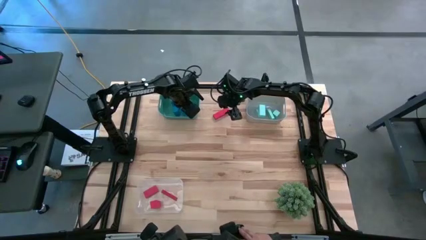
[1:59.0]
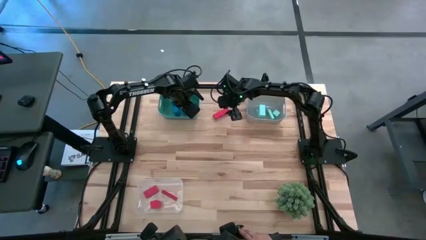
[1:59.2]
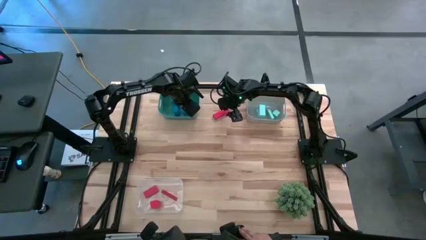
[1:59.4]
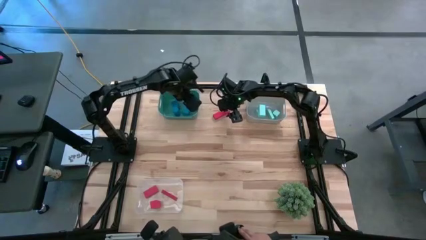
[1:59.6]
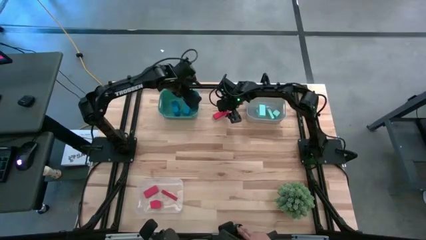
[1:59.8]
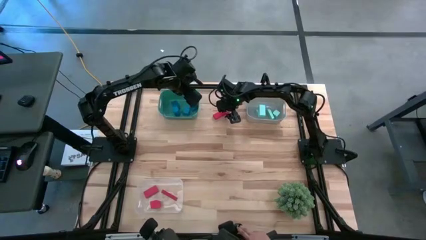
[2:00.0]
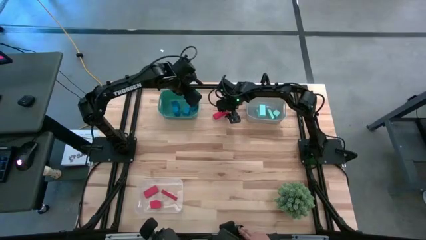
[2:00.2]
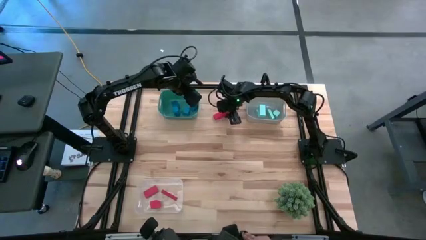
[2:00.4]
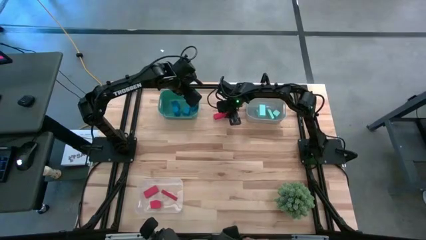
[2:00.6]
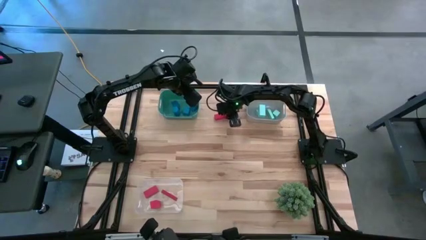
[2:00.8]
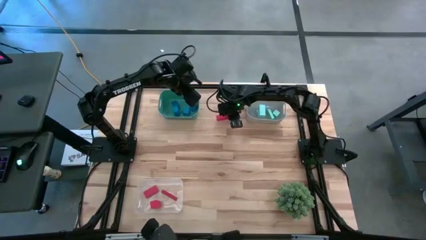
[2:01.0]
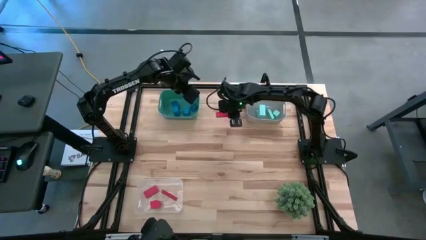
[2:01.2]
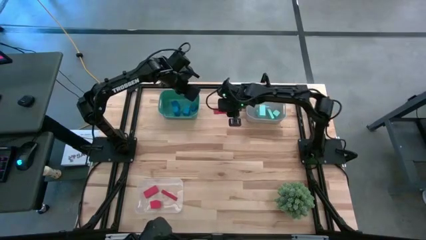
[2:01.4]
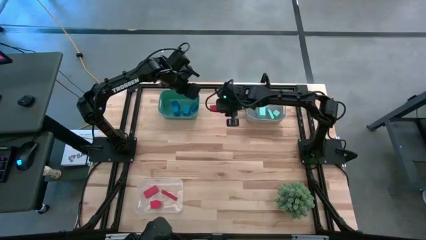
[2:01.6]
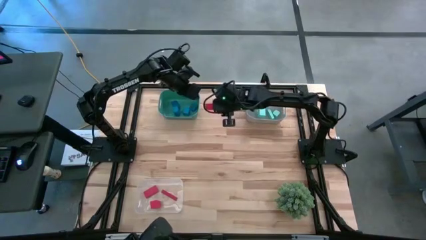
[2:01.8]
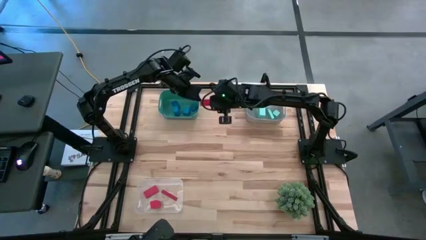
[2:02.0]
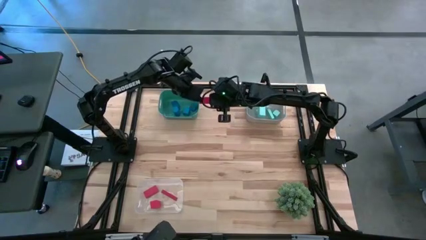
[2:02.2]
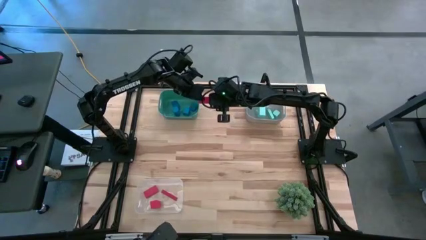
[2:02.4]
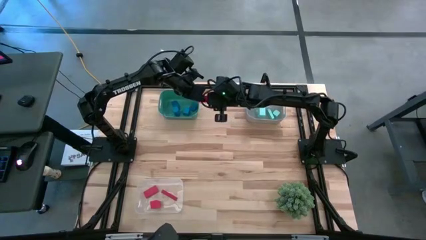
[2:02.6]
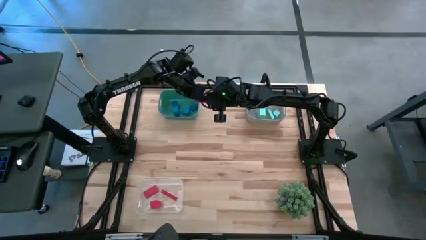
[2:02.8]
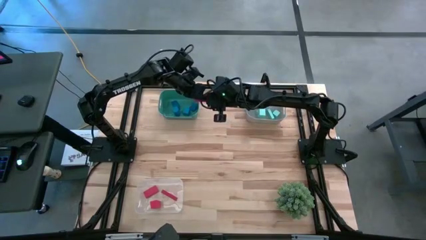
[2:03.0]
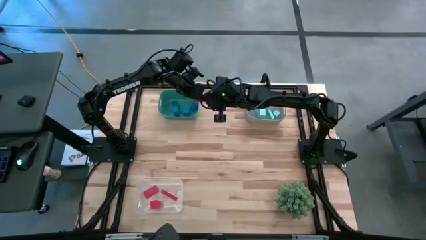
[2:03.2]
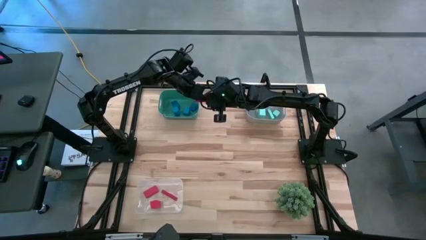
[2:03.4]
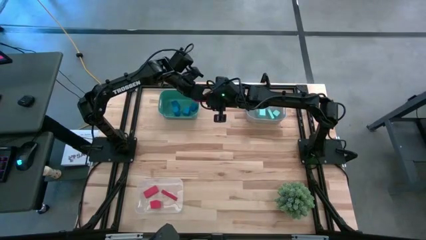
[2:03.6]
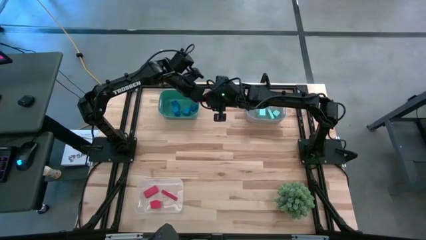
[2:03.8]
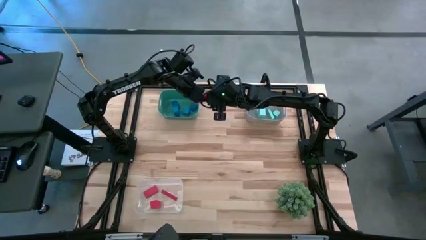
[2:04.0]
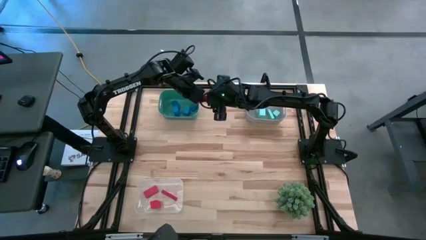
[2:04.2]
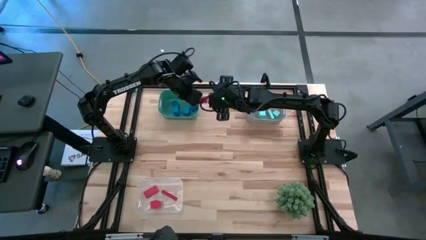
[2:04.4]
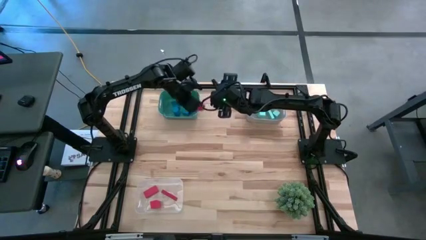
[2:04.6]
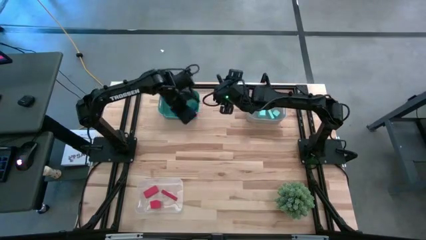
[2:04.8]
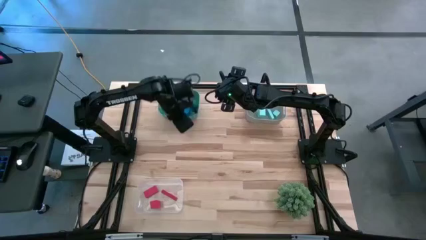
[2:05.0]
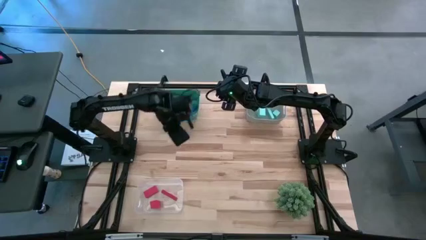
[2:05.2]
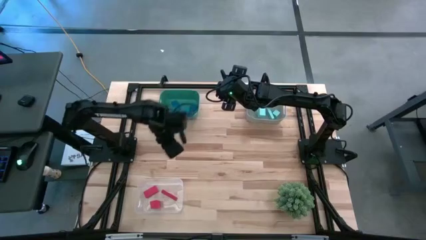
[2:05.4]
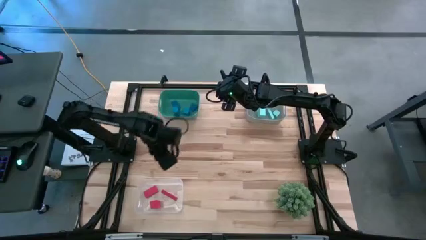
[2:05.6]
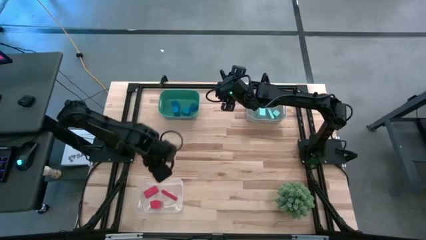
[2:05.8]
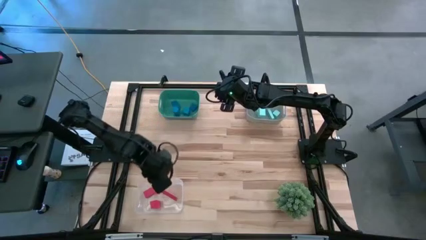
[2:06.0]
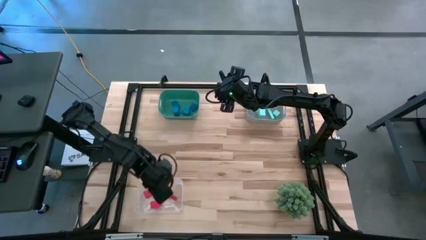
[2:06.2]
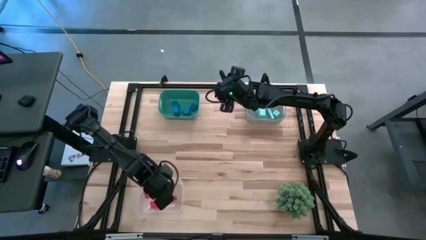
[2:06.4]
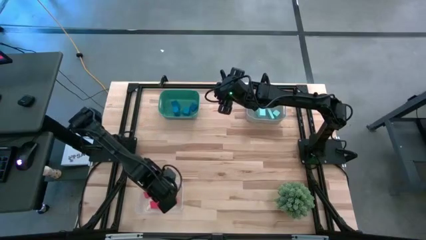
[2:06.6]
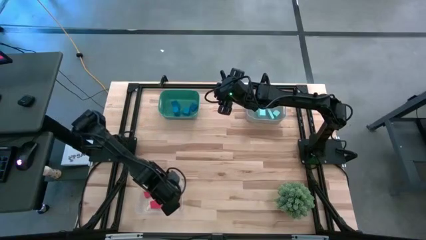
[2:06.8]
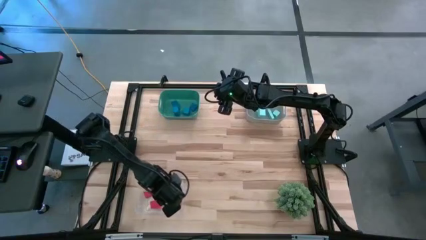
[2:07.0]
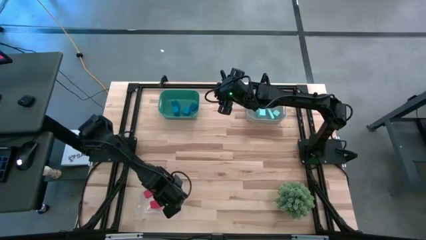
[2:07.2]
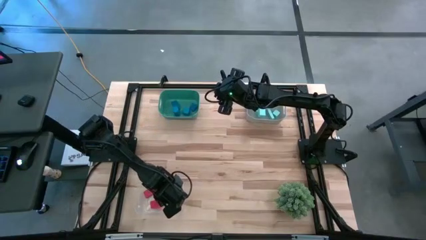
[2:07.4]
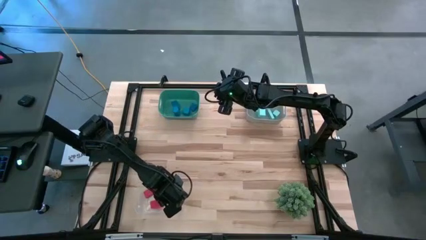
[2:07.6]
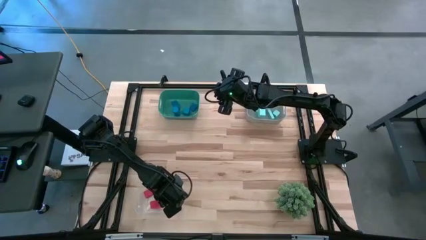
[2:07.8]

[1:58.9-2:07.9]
Task: Sort & place blocks by color
Put the red block into the transparent bin

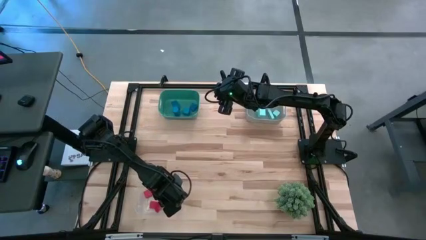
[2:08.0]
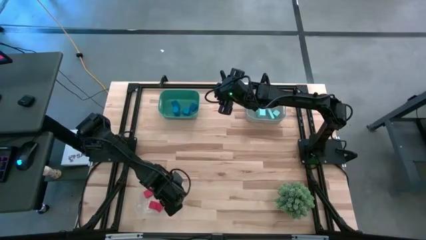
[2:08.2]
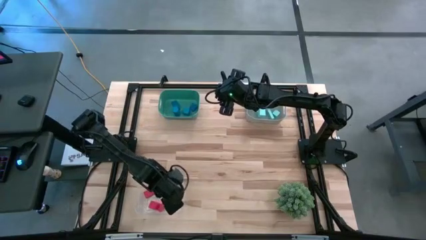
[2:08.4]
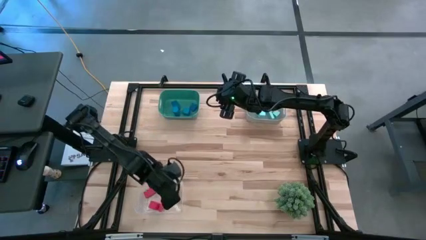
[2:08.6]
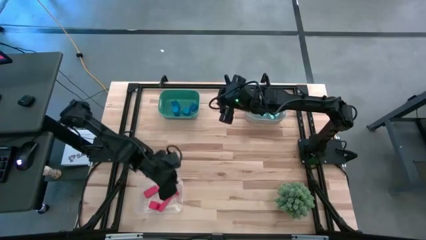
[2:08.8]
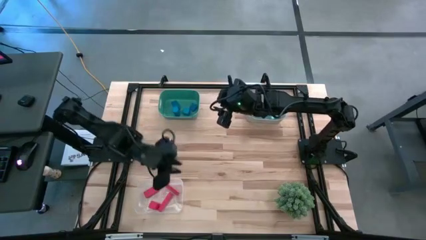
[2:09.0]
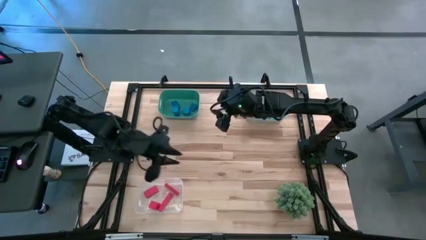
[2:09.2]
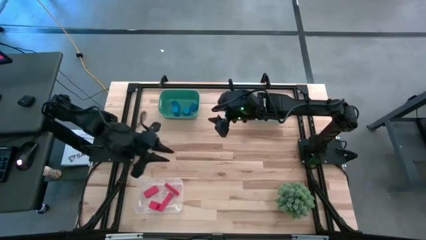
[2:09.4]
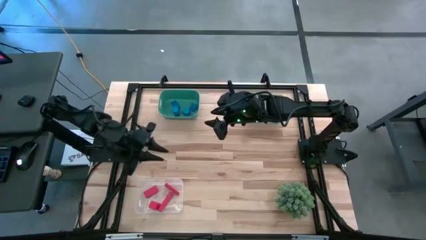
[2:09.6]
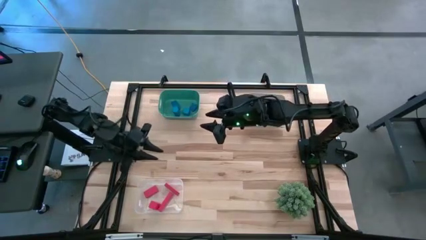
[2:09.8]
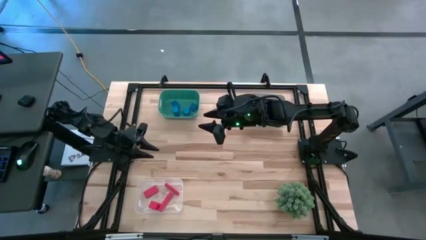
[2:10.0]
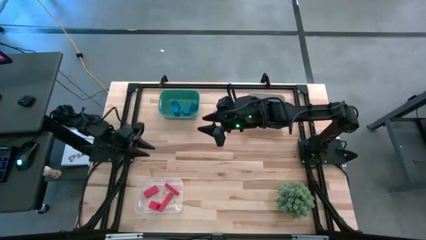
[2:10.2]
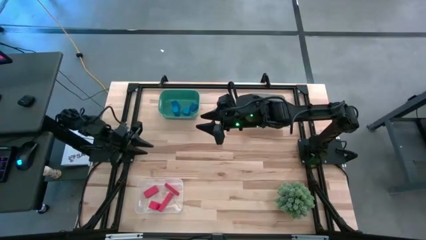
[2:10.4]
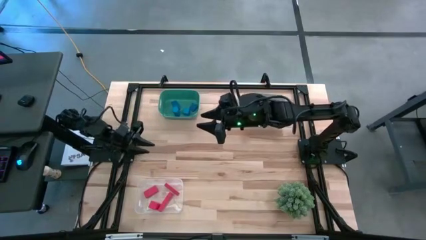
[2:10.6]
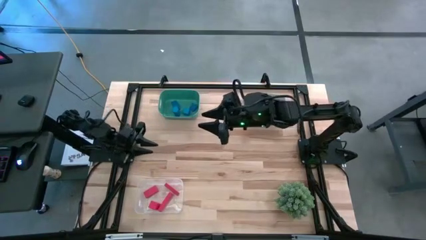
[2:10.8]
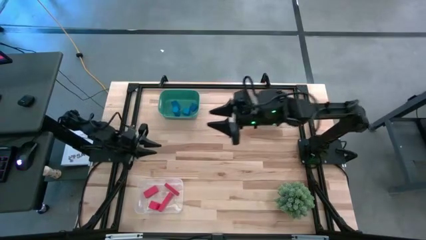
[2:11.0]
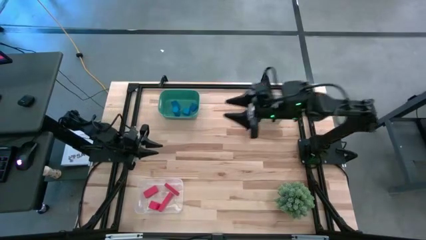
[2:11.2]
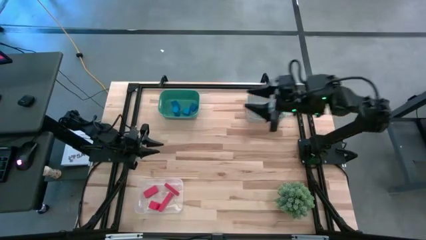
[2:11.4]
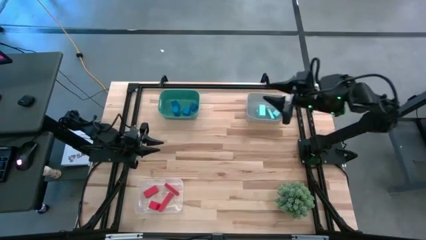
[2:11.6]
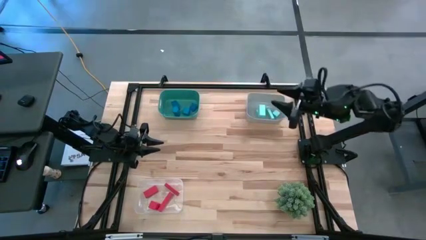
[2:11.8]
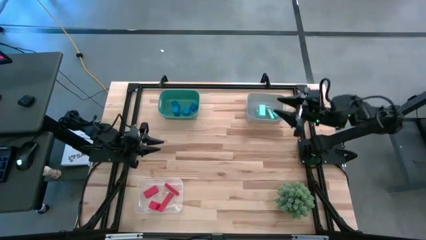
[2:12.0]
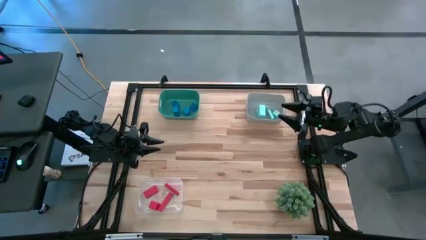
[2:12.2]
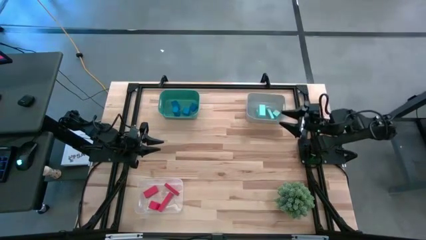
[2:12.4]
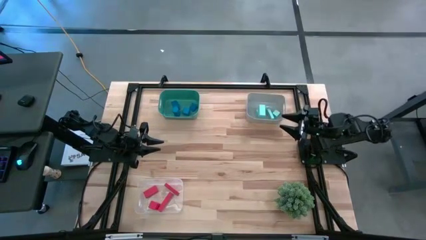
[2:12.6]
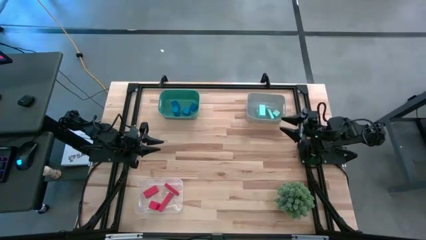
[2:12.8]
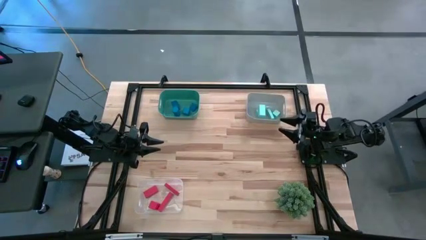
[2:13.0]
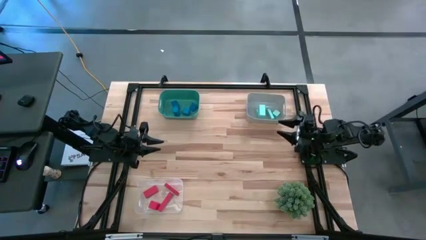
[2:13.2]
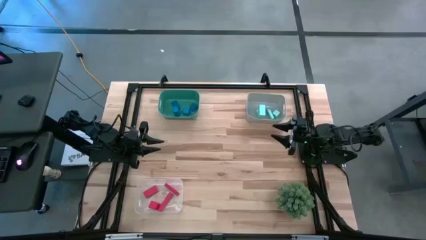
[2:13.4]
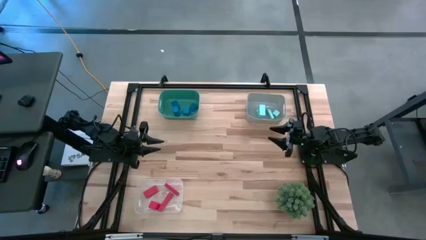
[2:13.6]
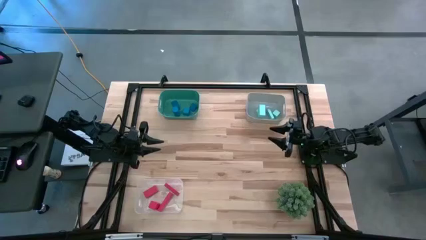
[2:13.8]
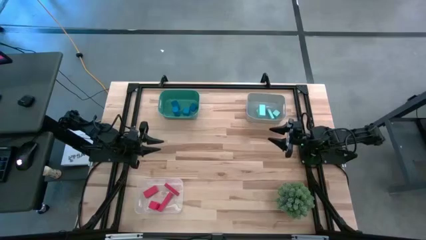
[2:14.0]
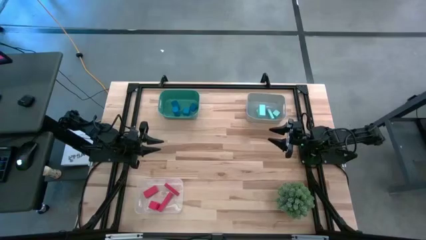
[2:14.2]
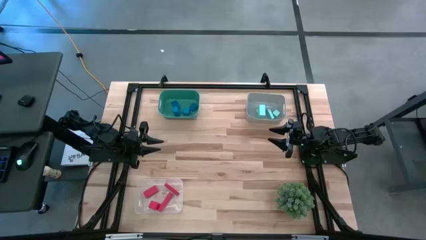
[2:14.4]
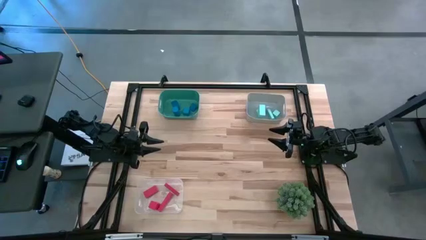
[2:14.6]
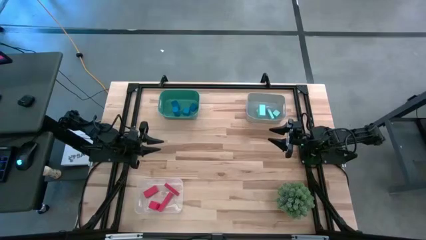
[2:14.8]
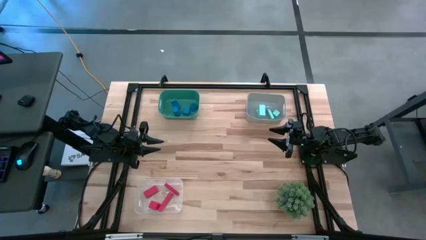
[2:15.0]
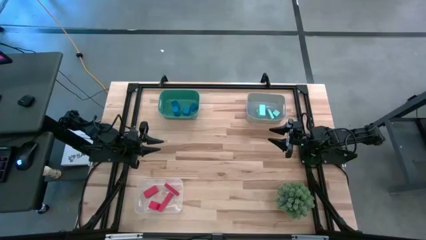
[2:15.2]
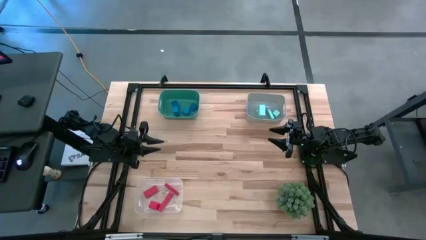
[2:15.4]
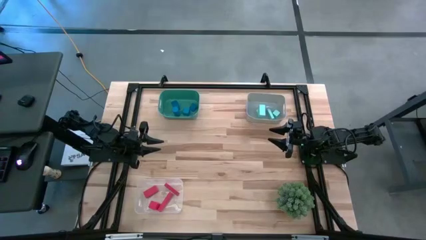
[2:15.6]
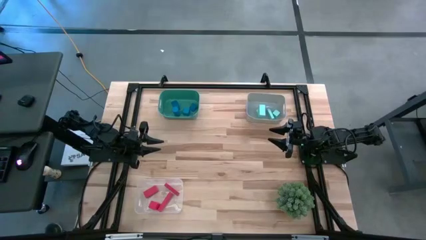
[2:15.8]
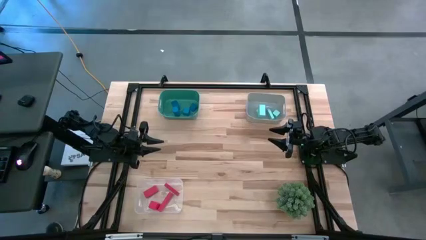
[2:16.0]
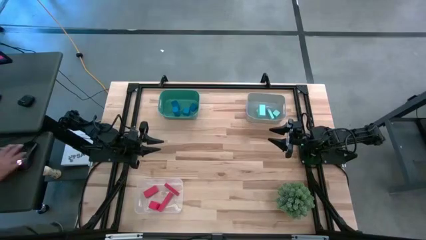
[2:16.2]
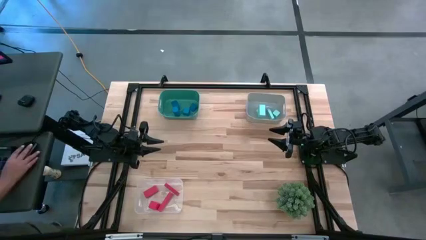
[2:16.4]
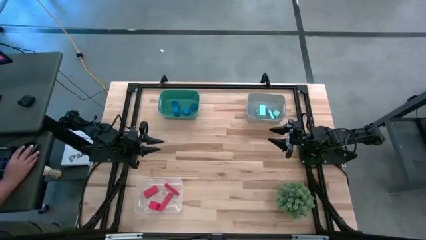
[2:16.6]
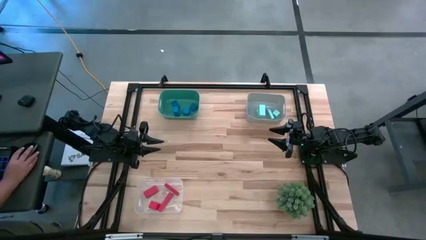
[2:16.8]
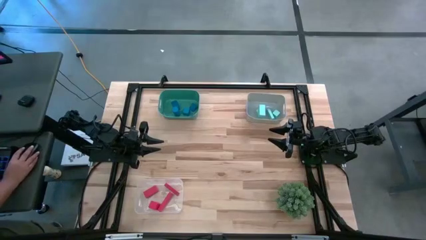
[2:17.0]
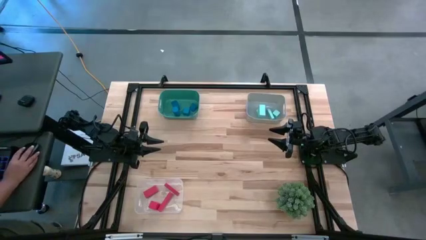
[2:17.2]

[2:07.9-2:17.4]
Return to Home Position
